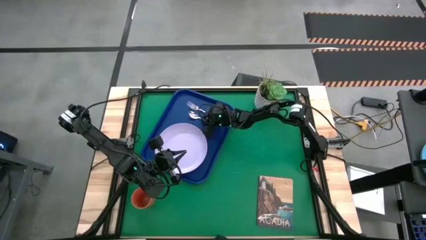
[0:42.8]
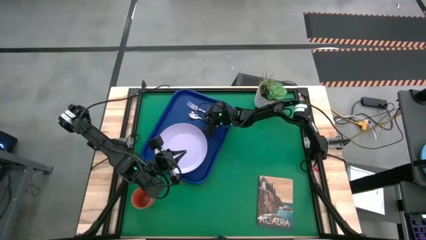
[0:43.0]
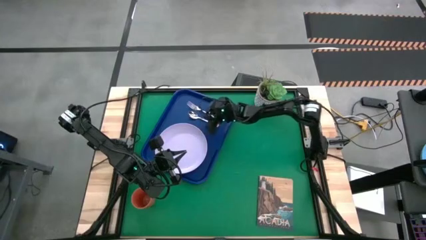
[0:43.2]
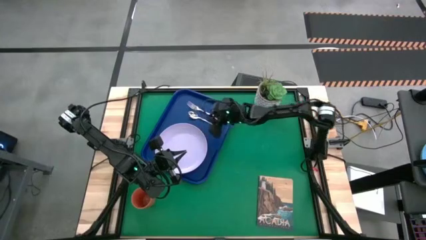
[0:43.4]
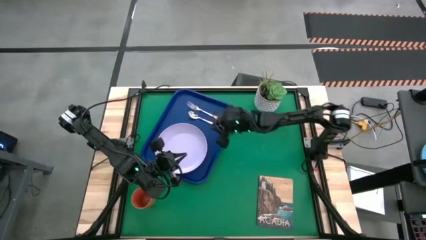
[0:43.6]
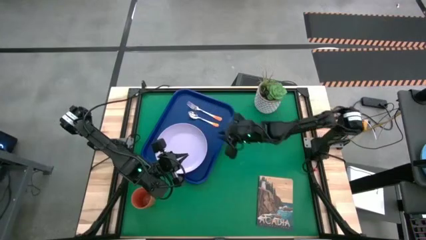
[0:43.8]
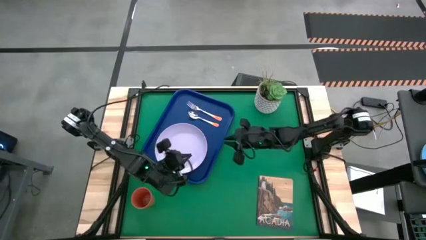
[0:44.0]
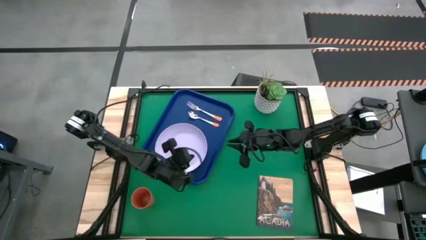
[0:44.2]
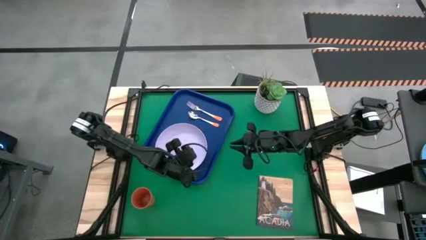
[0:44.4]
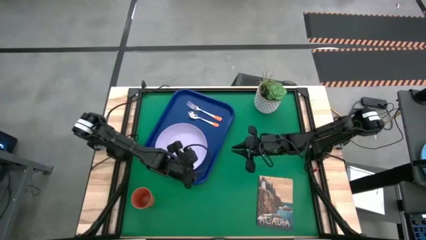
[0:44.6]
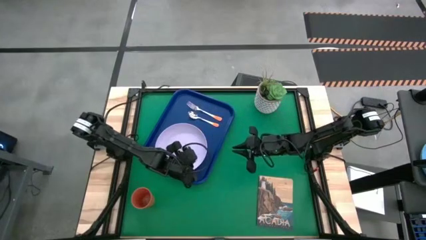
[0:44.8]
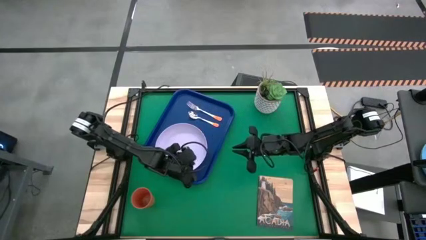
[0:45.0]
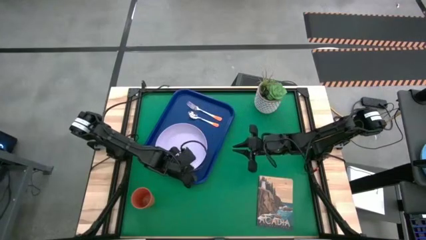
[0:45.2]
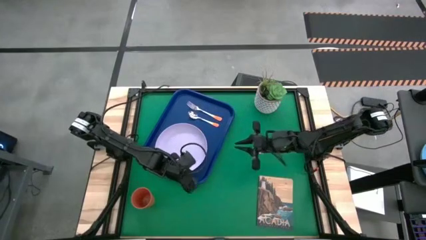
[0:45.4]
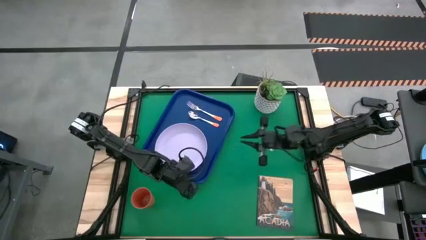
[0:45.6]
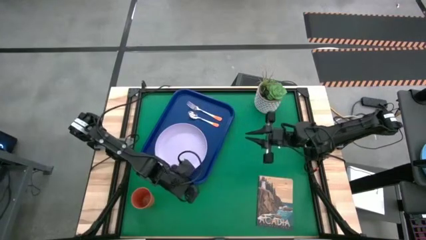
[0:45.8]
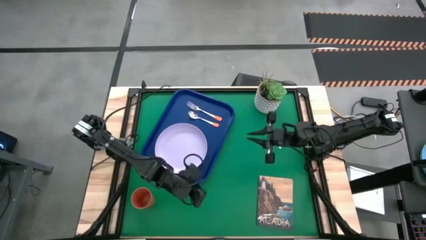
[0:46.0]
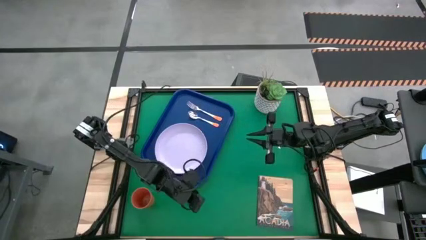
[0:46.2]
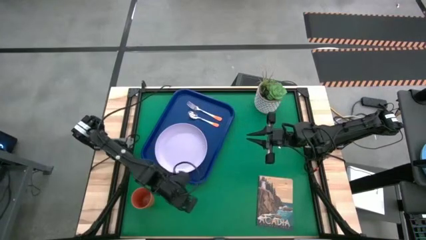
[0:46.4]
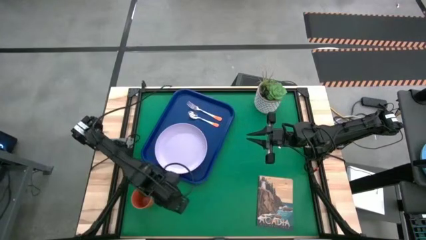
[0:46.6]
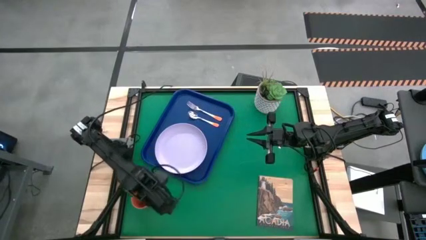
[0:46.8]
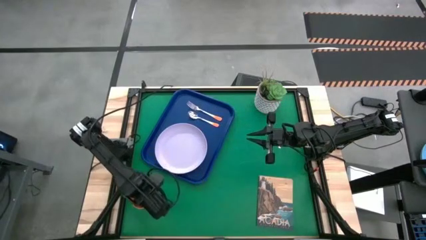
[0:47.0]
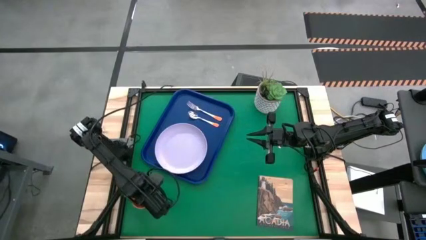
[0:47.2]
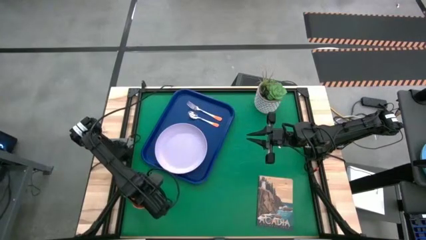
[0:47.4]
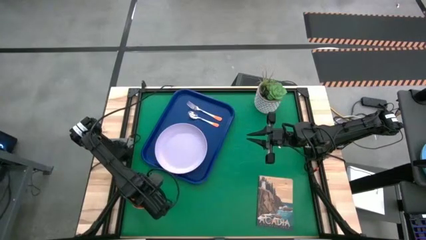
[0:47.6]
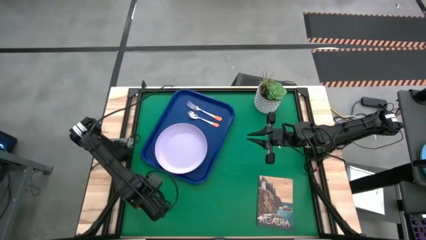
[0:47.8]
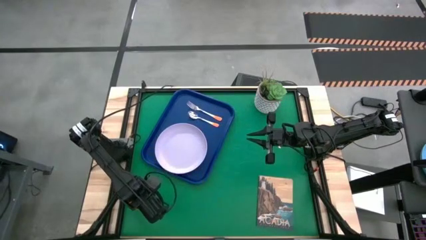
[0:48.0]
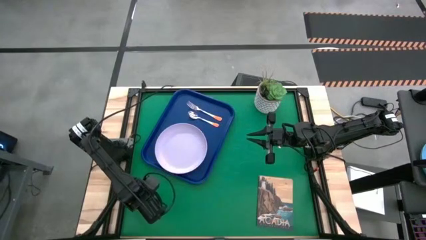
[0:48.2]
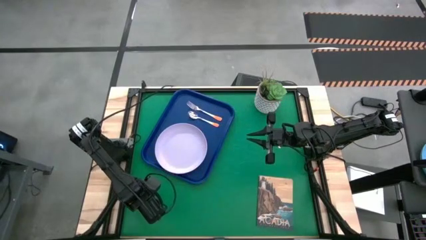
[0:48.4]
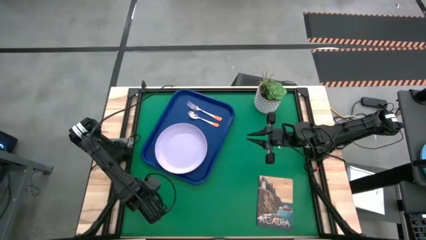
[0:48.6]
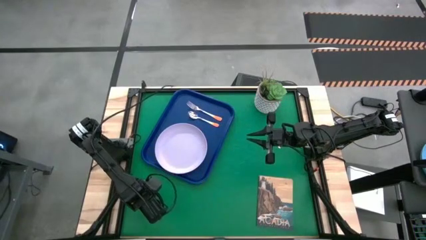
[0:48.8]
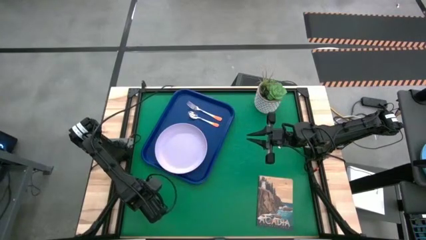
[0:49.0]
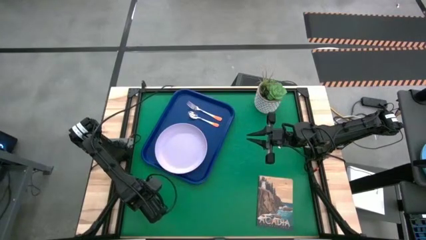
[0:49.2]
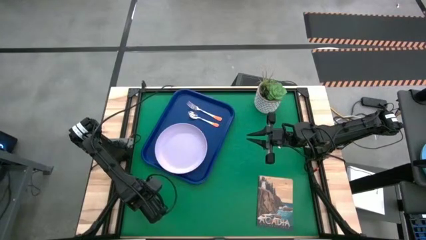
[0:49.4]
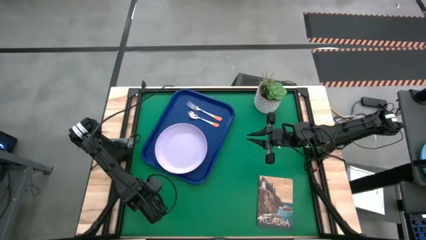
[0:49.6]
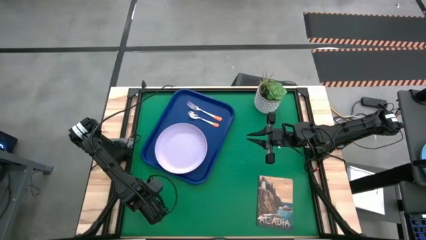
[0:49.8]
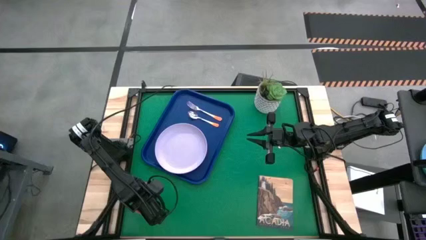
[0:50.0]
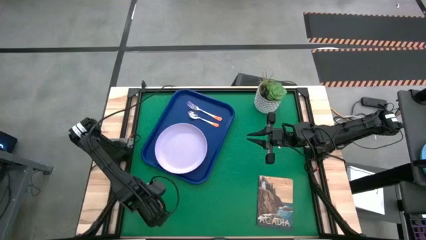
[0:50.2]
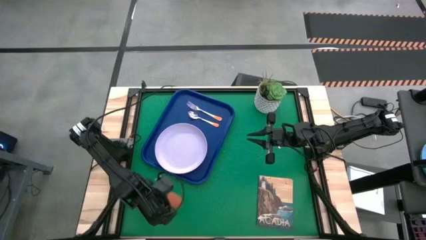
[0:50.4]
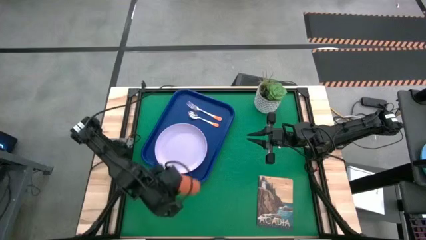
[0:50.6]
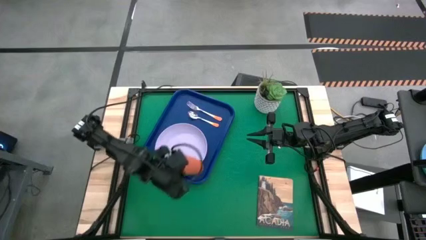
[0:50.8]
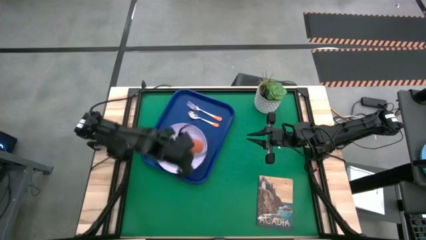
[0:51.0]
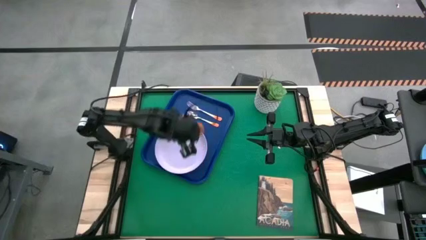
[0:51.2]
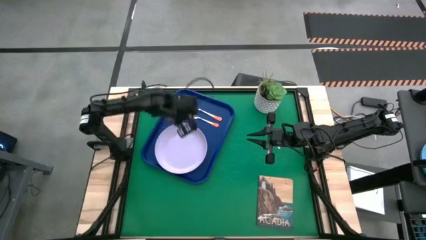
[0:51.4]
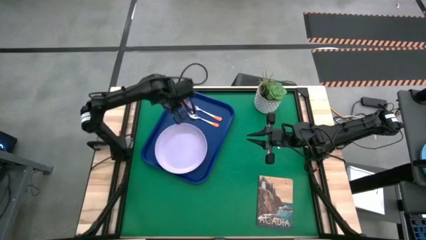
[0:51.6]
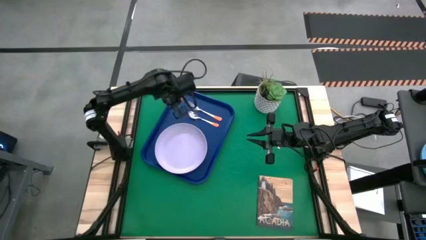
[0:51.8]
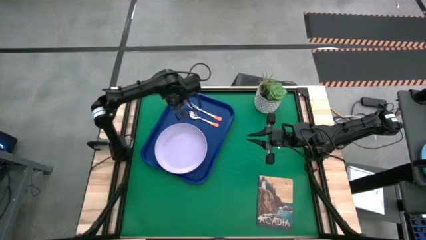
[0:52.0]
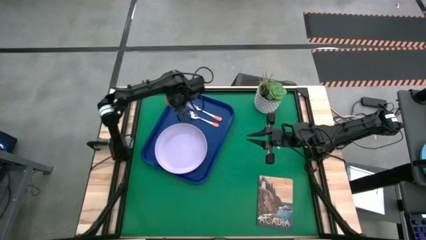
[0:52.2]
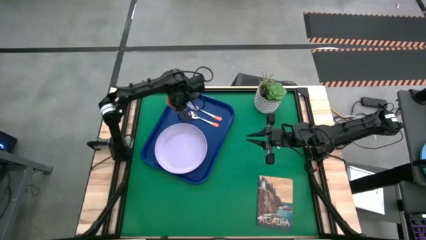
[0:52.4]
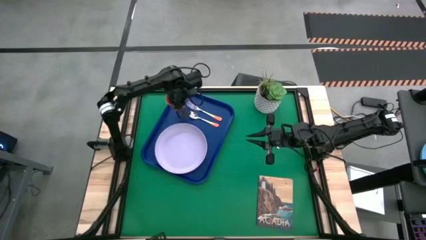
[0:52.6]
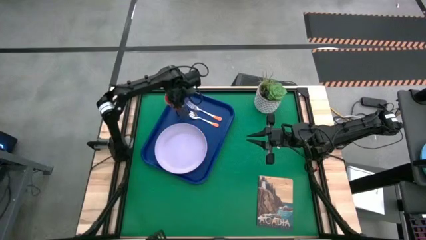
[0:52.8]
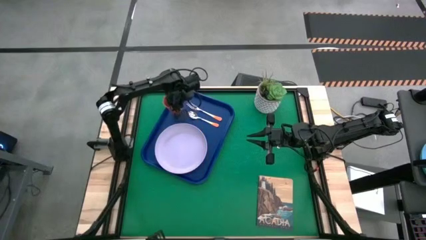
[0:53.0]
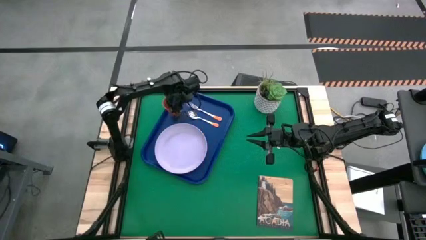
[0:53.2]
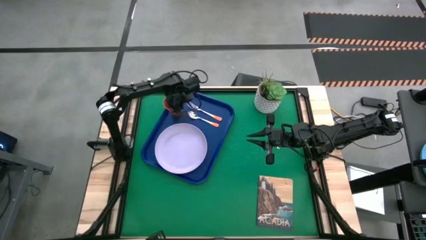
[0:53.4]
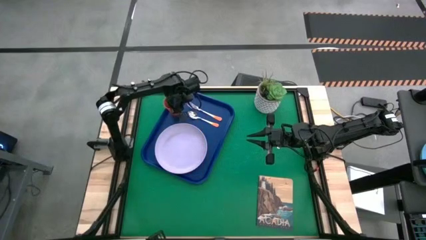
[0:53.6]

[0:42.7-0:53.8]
Task: Pick and place plate/cup/fork/spoon on tray
Put the orange cup on the blue tray on top of the orange spoon

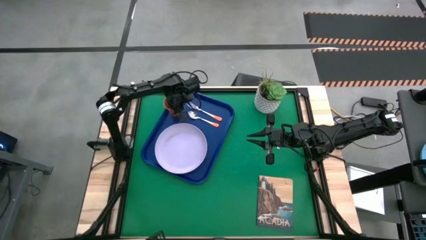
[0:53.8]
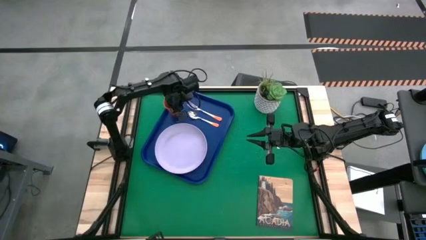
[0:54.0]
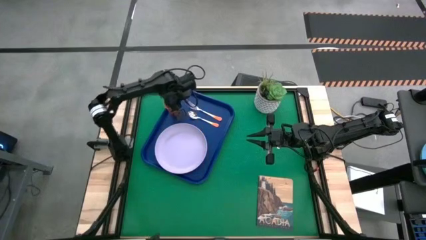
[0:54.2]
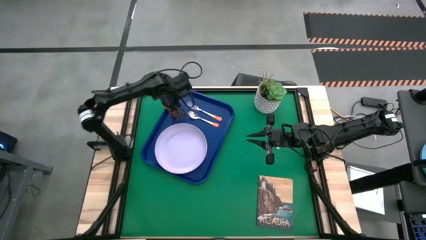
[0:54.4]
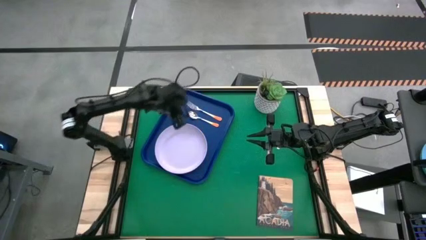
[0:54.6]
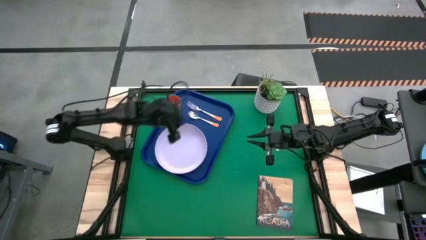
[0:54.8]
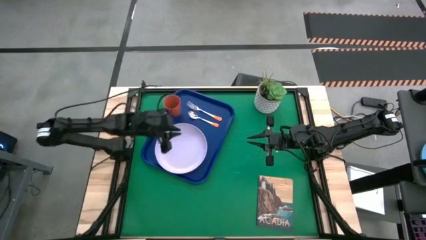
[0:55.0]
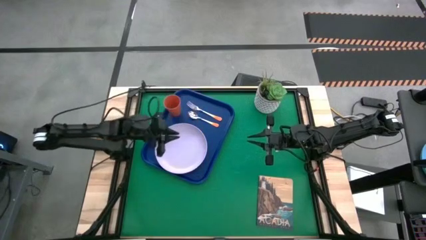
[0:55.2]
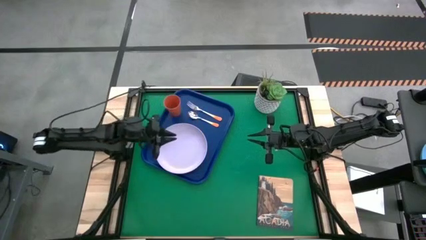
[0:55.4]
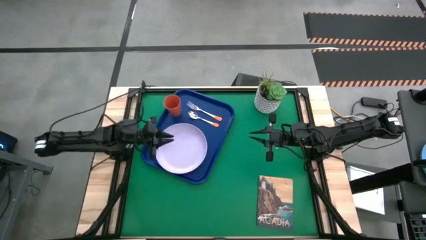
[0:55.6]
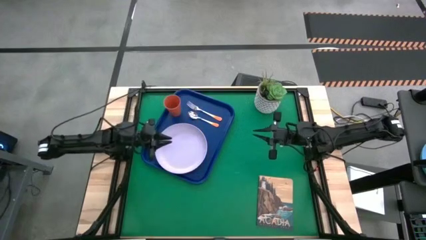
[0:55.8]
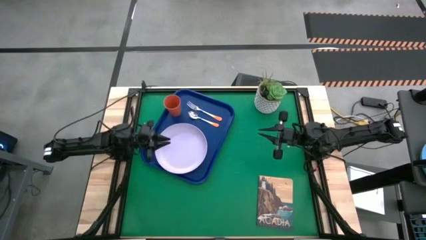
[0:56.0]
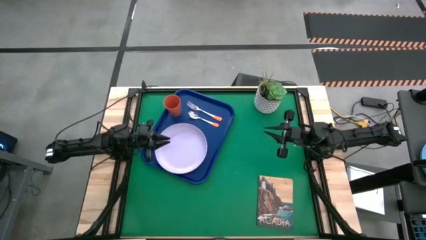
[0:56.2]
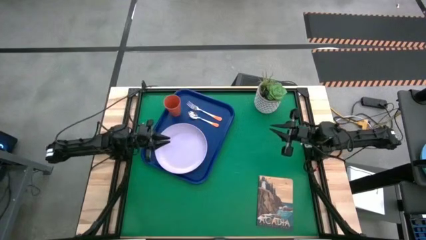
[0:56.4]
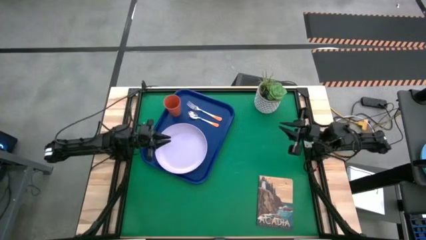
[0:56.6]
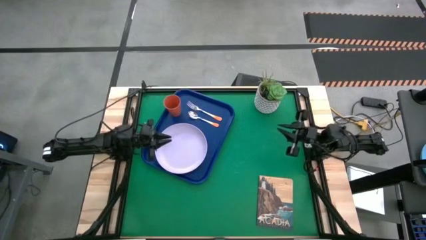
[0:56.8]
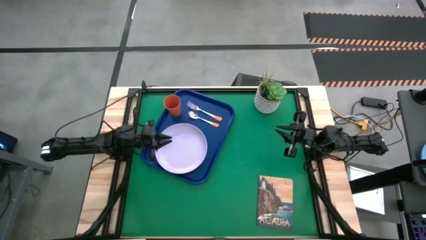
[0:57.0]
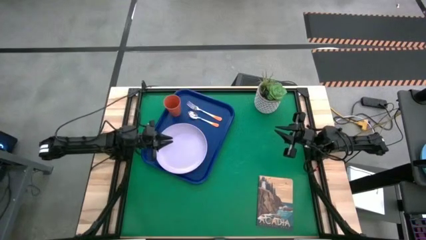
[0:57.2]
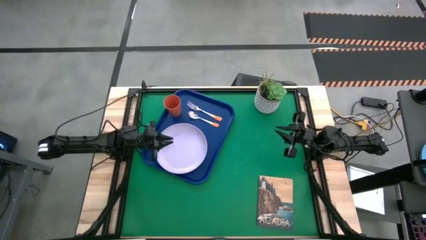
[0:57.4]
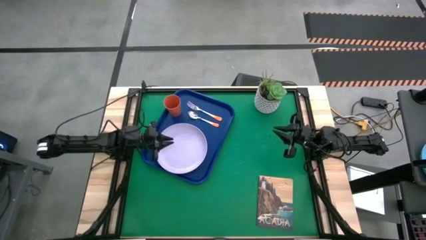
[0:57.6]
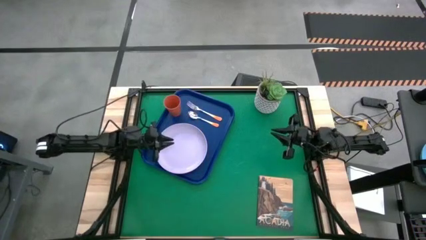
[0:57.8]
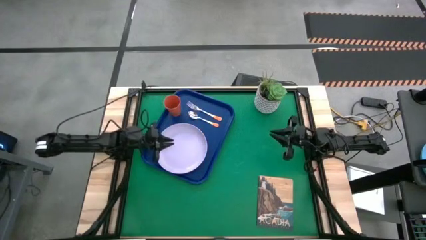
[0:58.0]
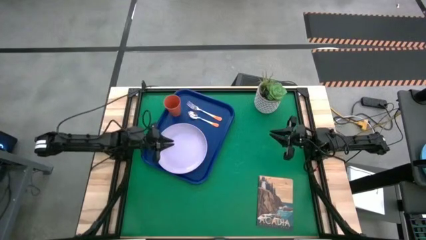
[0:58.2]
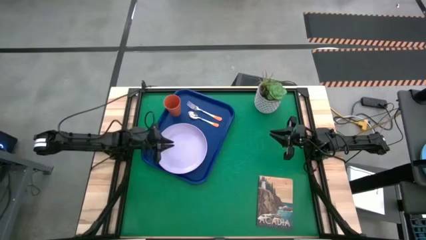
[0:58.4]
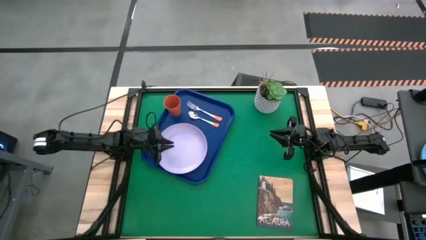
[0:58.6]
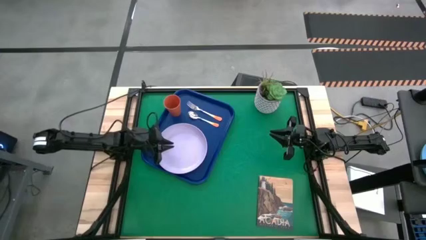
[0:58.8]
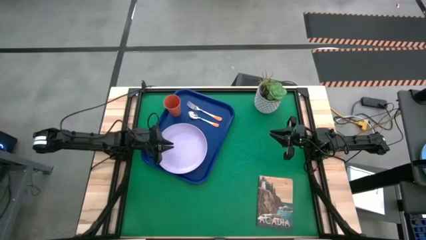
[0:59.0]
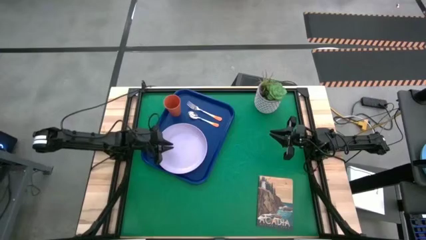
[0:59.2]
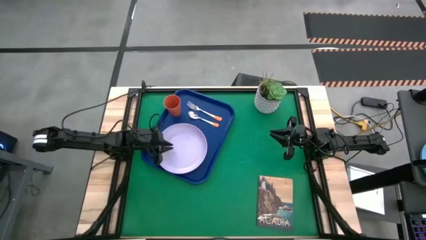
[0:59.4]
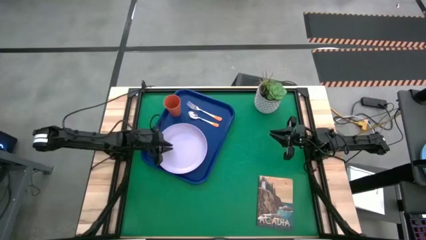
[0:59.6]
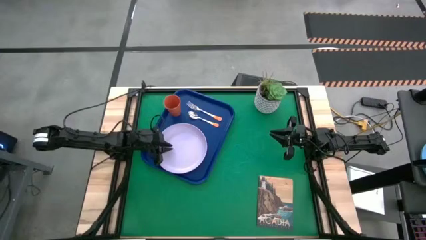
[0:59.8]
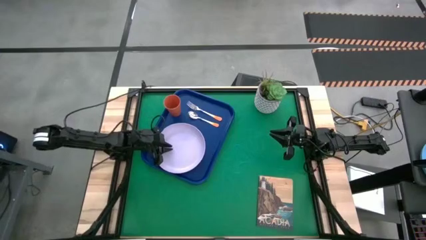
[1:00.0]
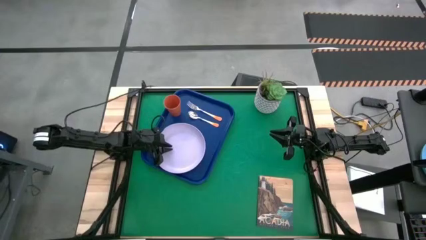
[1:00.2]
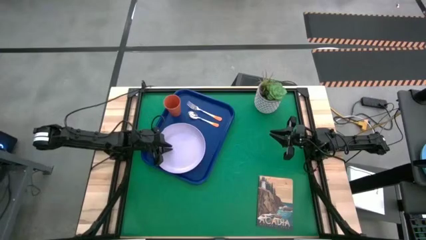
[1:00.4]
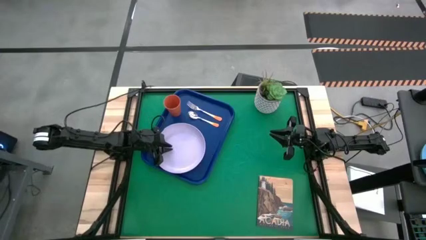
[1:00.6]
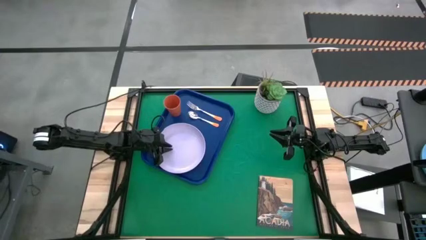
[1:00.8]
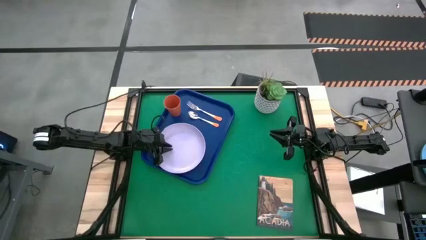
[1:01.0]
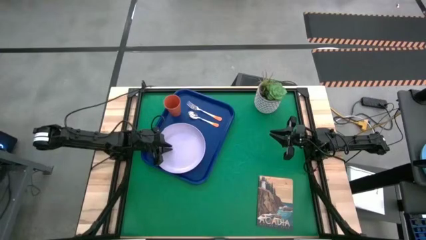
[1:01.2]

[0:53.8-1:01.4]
Return to Home Position
